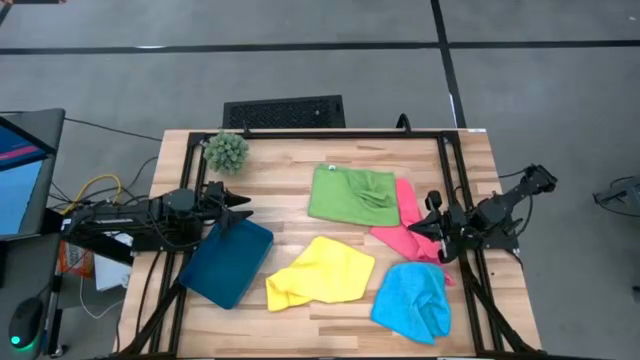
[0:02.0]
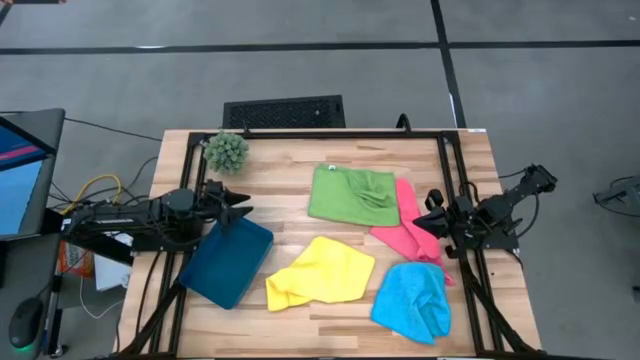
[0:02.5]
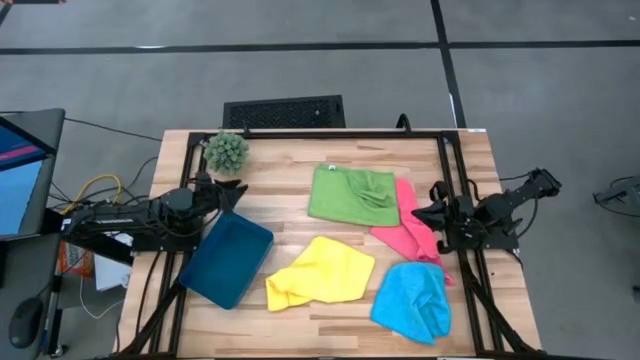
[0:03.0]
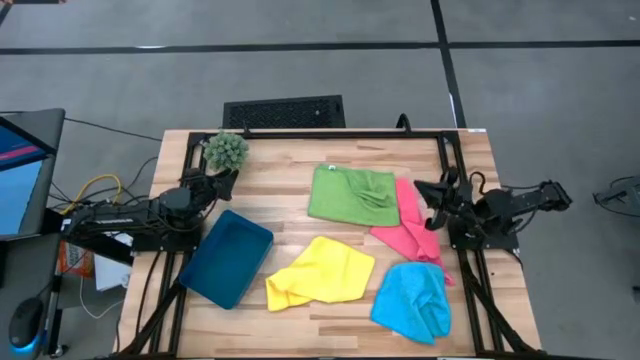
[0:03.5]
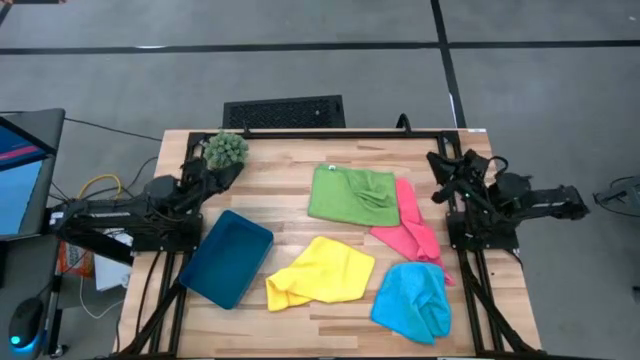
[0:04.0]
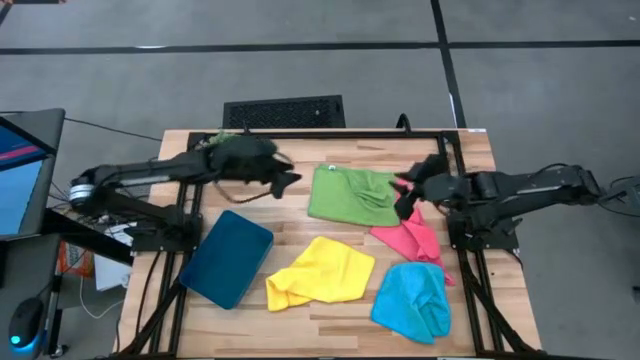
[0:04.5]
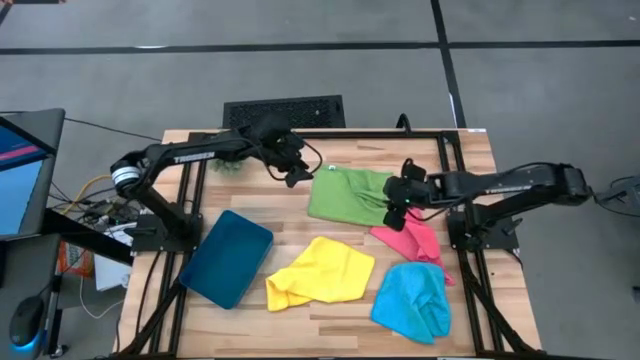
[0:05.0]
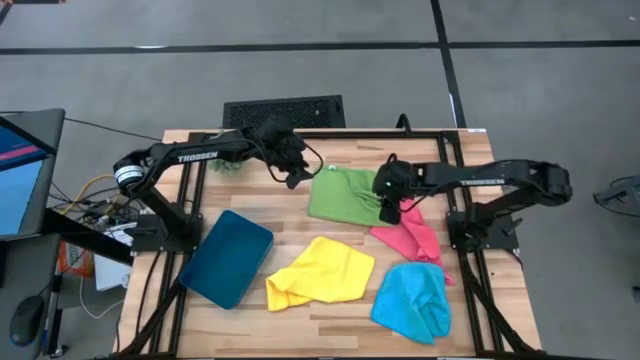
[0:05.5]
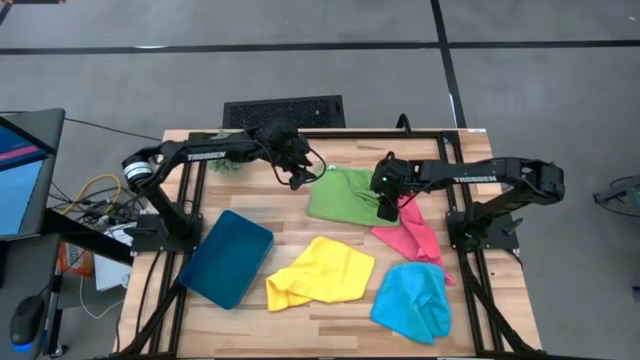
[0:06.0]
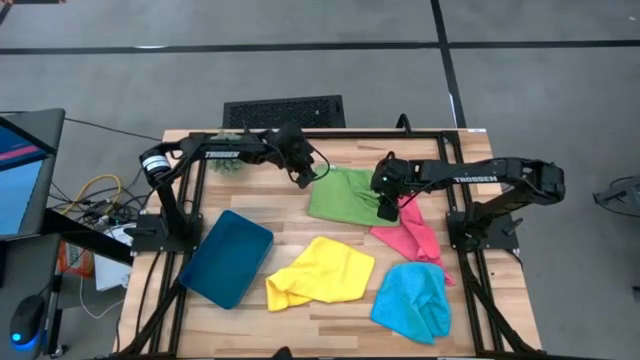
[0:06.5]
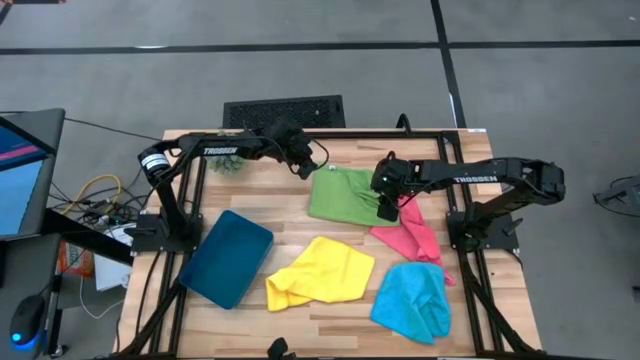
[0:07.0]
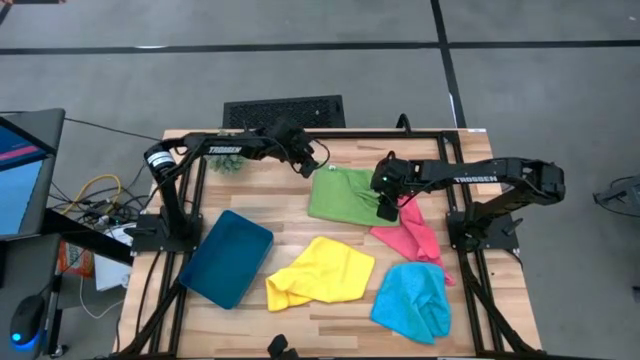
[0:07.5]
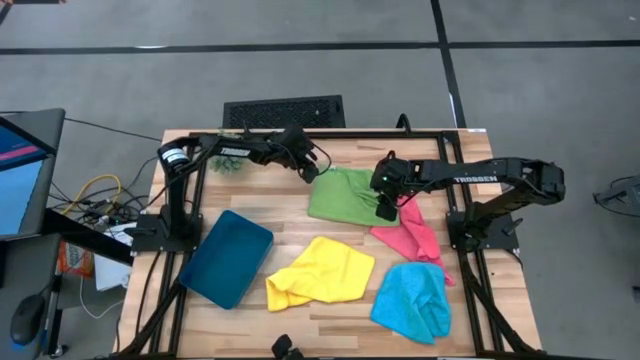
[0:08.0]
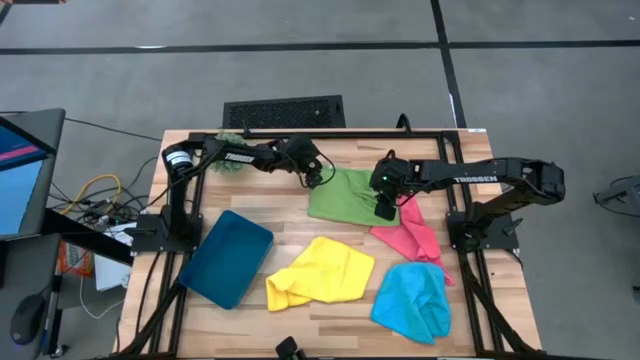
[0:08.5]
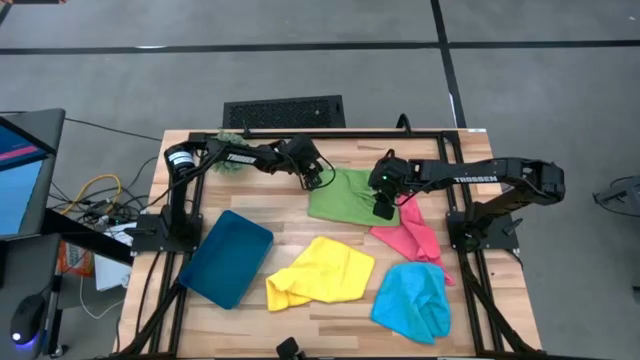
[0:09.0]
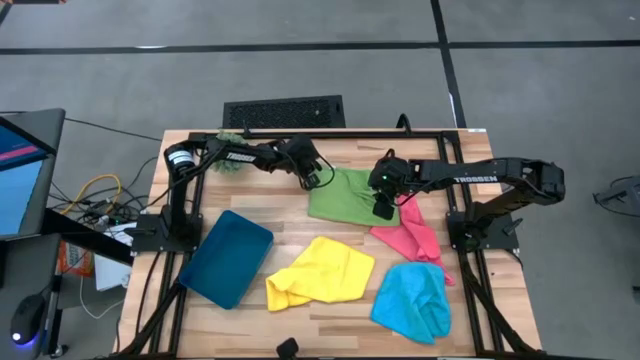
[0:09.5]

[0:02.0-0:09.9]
Task: Fold microfiber towels
Fold the green microfiber towel

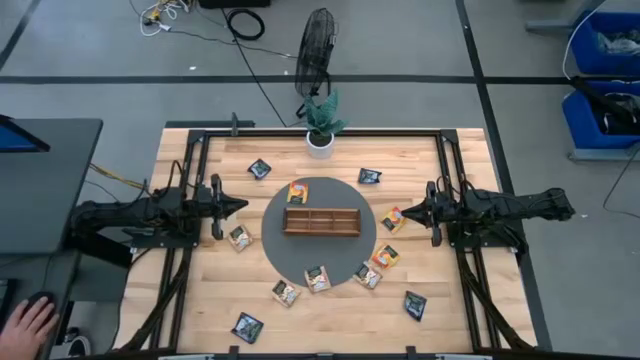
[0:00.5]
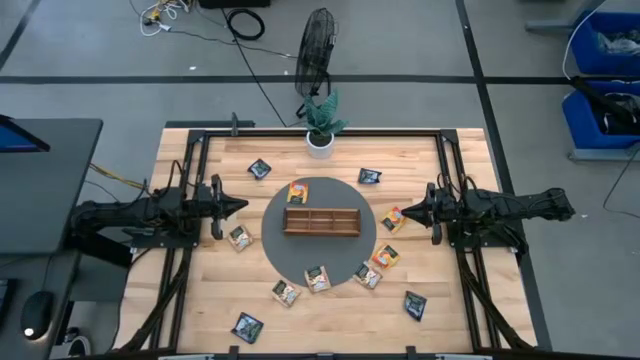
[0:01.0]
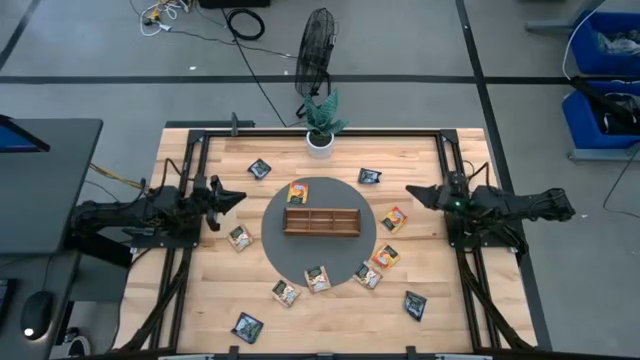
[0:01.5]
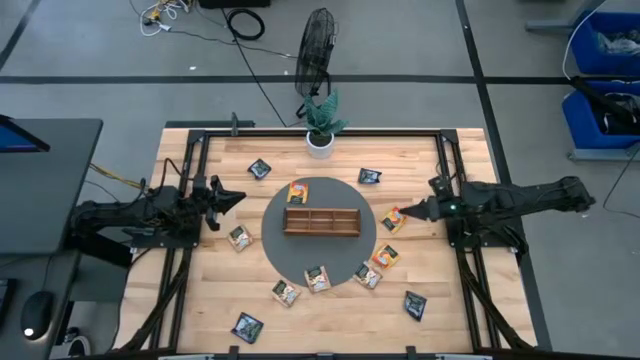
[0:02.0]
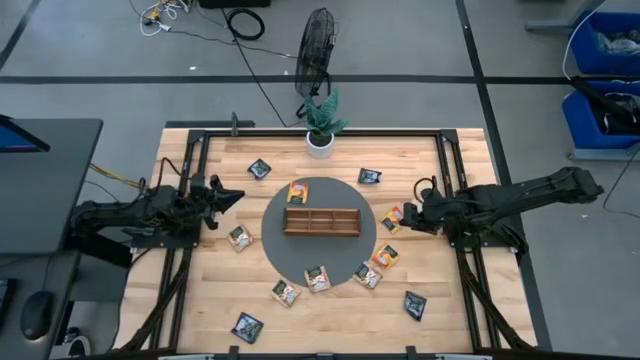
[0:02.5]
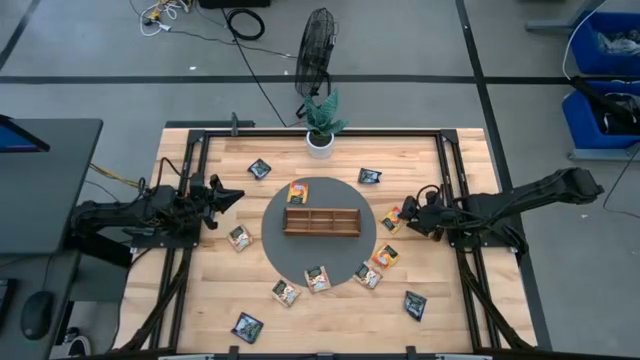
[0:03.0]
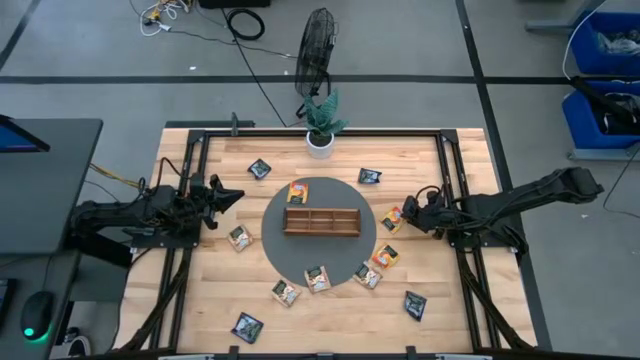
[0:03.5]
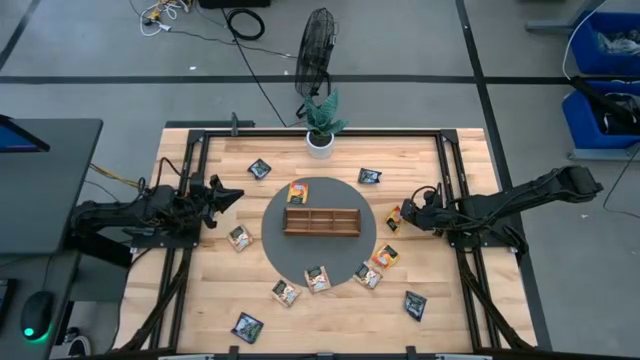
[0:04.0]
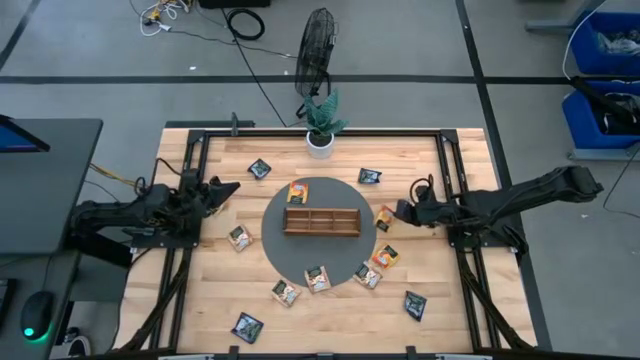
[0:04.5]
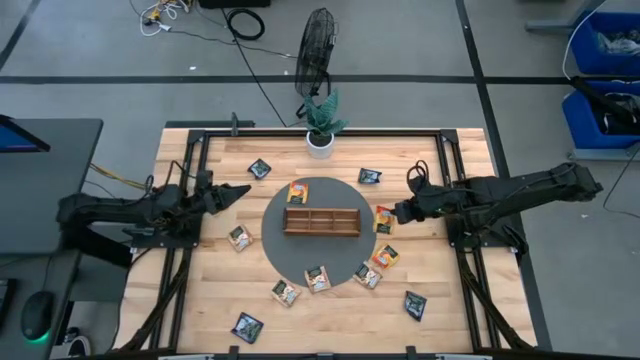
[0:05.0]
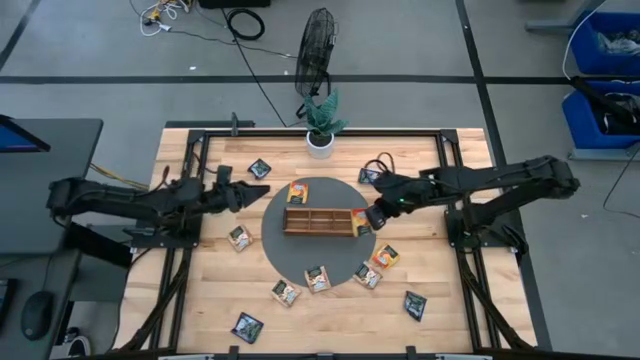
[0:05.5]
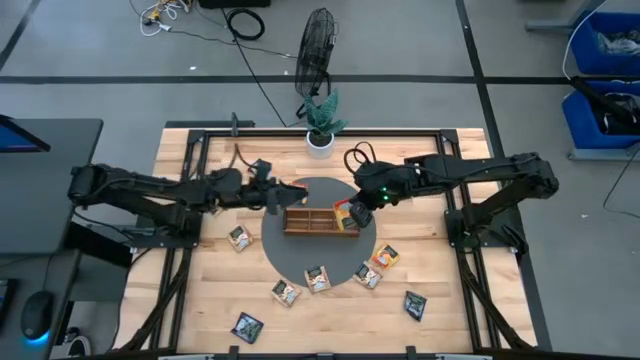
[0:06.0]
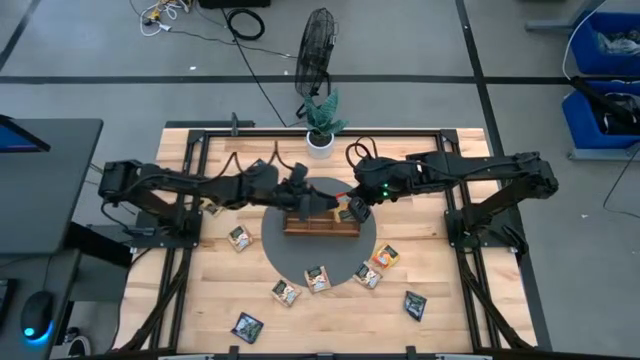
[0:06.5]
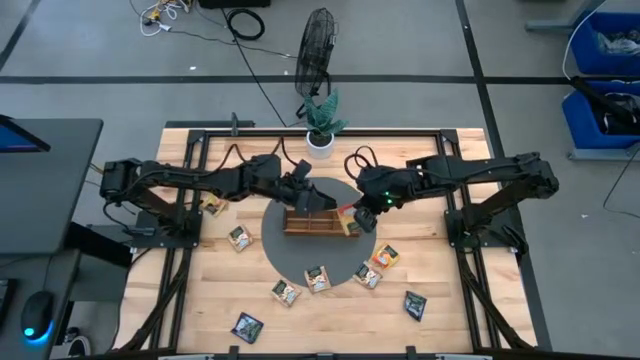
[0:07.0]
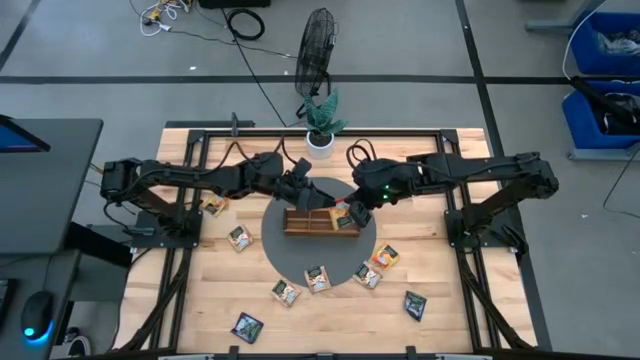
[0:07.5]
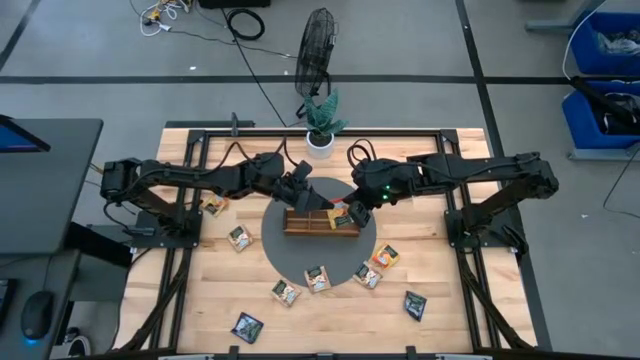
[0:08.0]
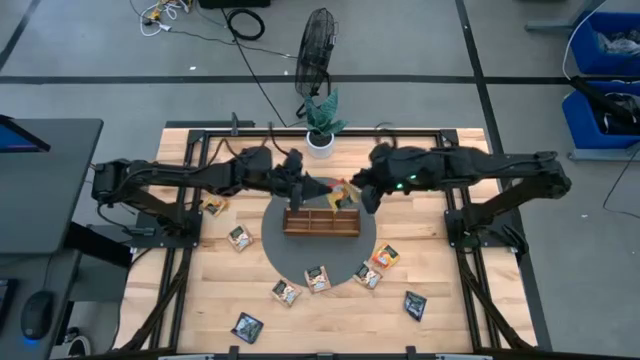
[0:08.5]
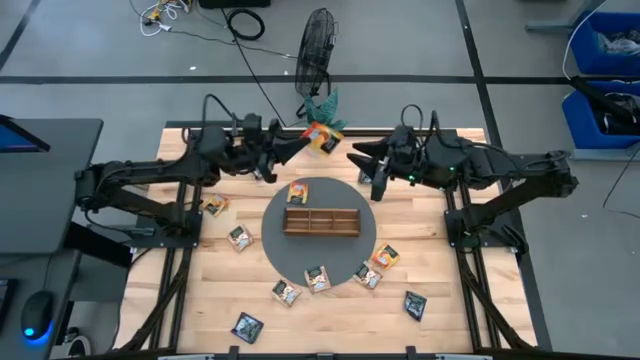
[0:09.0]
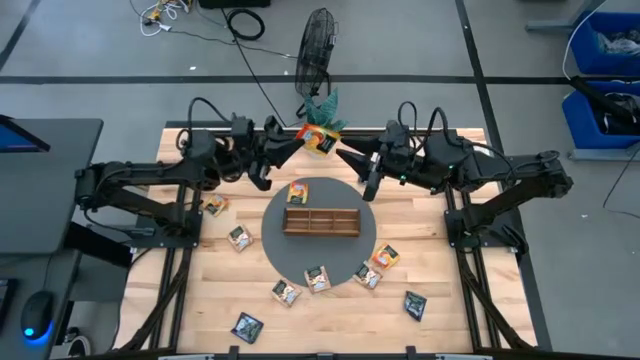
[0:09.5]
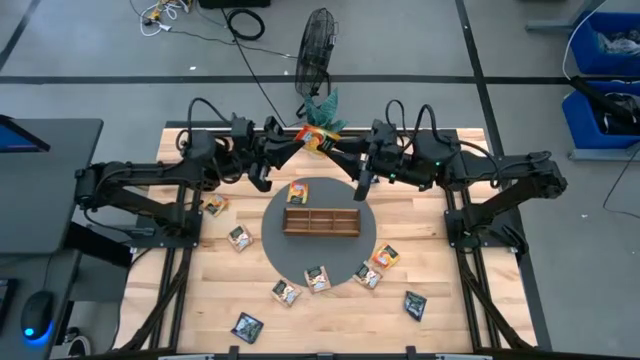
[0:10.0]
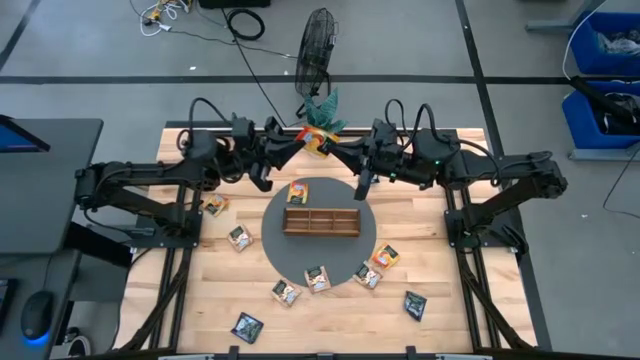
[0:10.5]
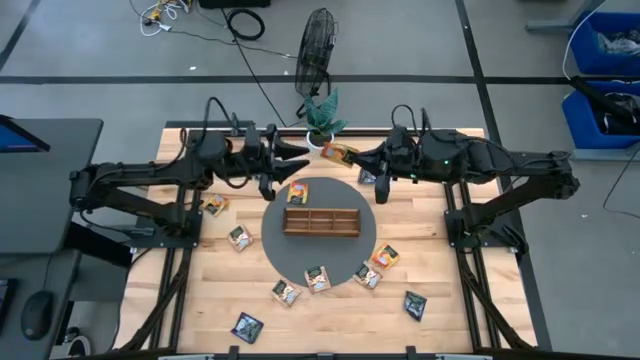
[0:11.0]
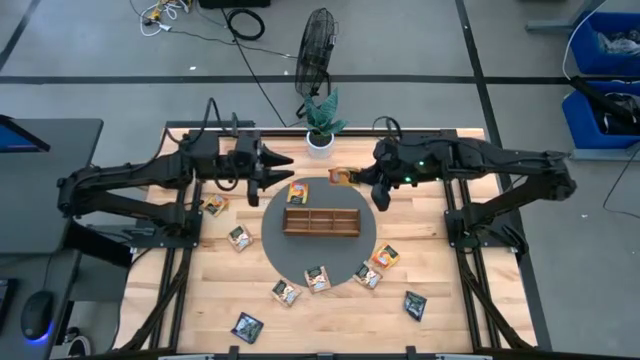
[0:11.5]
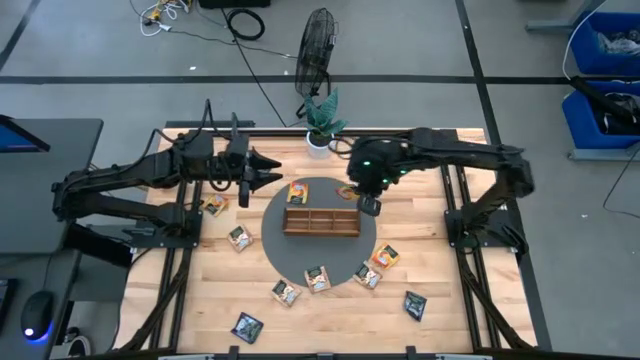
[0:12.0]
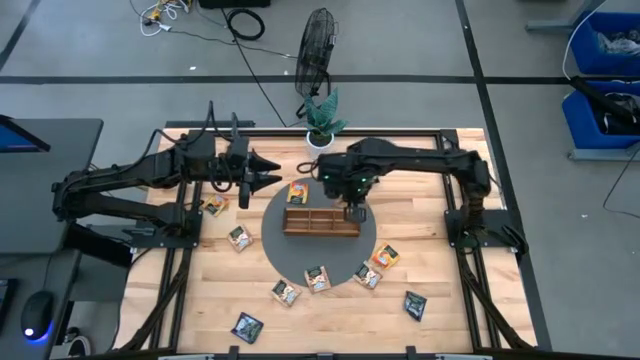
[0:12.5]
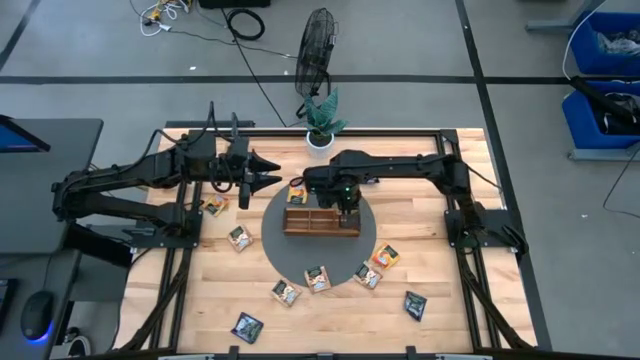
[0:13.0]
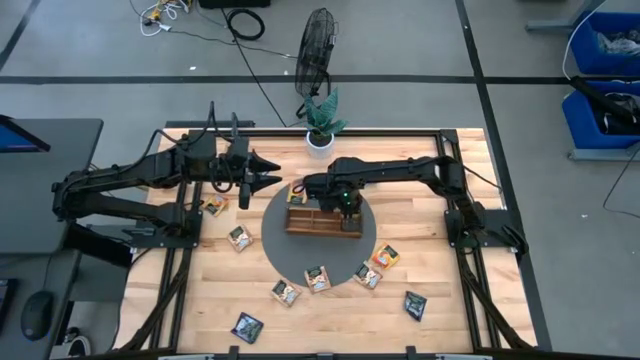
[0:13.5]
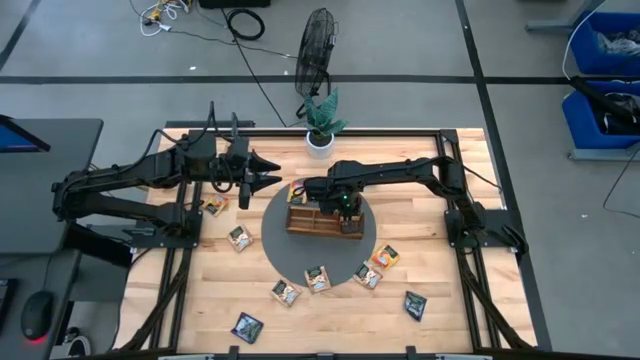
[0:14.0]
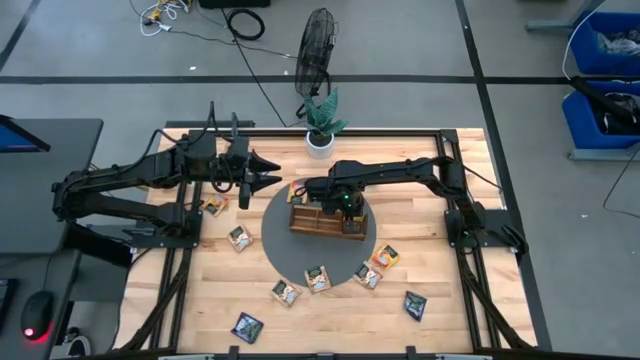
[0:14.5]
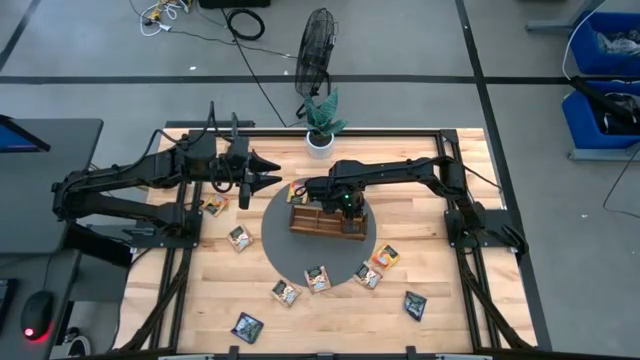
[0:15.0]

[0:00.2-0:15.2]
Task: Pick & Place Tea
Put the yellow tea bag into the right section of the wooden organizer
